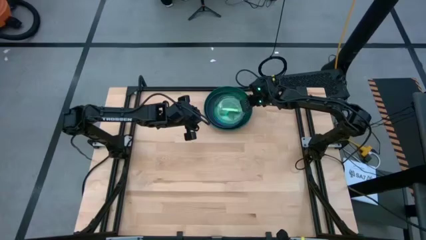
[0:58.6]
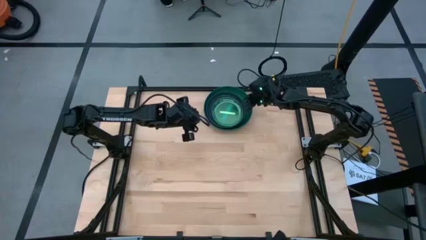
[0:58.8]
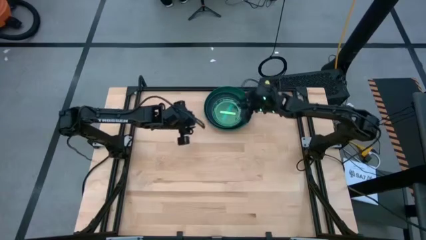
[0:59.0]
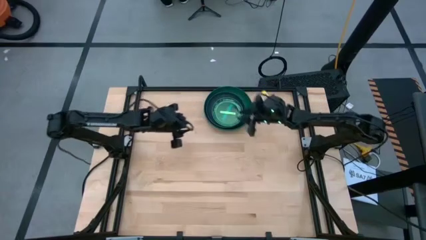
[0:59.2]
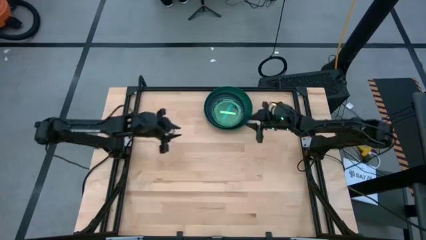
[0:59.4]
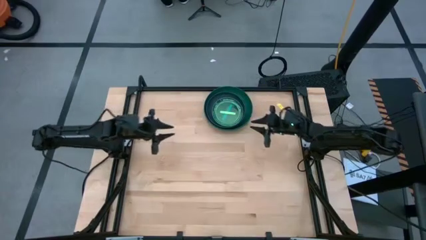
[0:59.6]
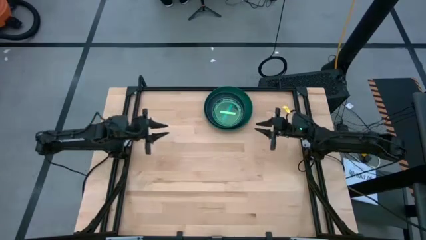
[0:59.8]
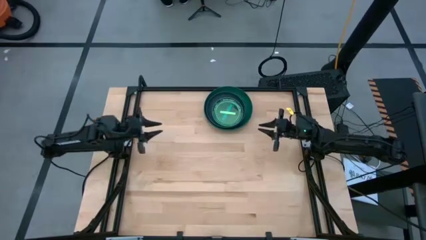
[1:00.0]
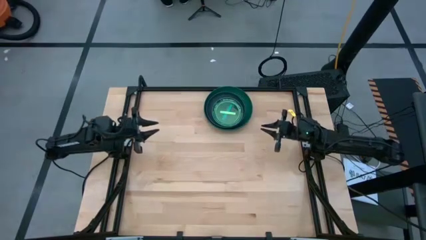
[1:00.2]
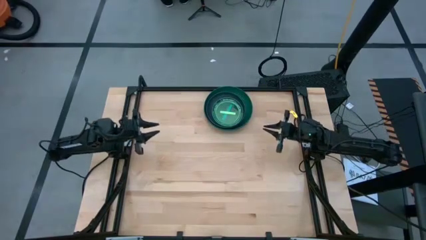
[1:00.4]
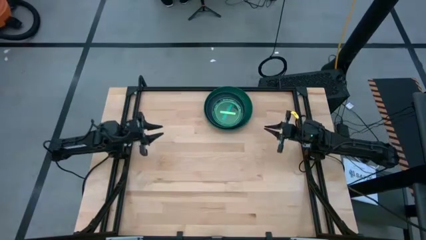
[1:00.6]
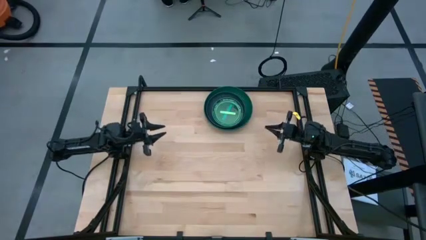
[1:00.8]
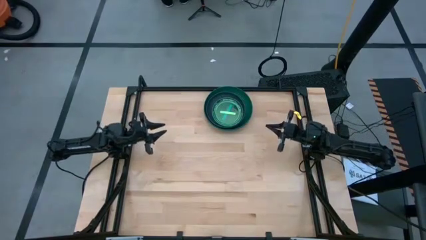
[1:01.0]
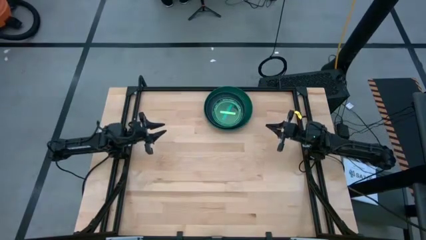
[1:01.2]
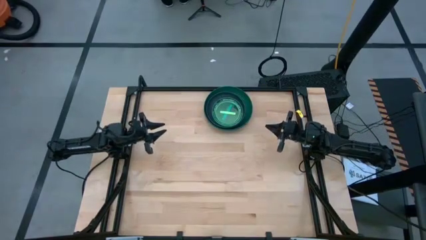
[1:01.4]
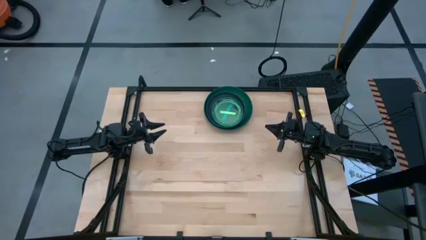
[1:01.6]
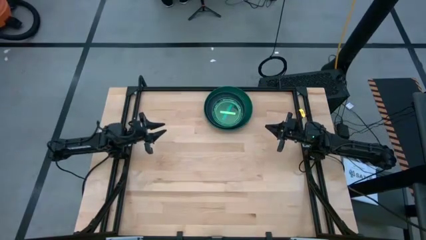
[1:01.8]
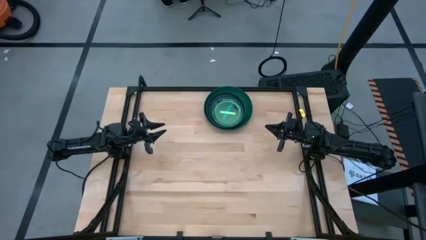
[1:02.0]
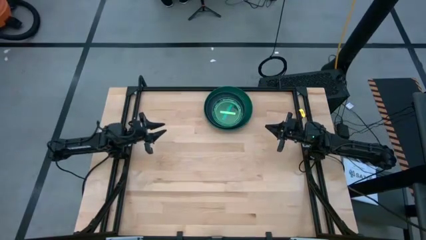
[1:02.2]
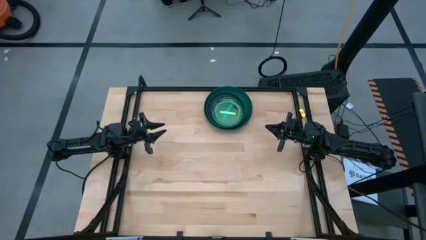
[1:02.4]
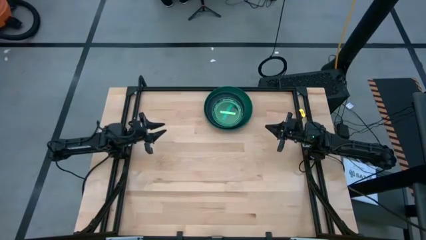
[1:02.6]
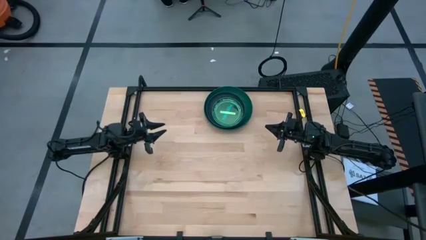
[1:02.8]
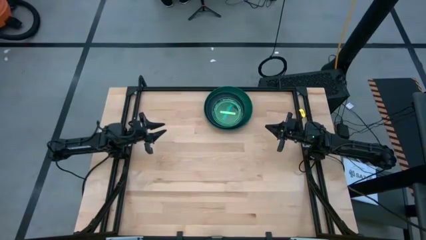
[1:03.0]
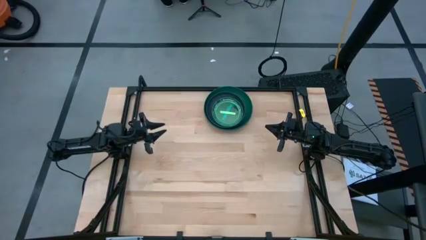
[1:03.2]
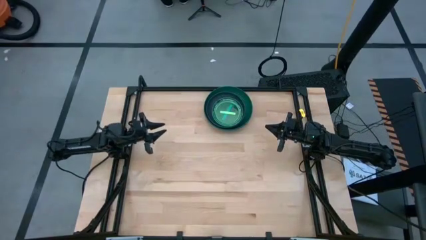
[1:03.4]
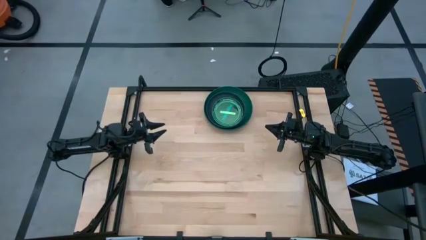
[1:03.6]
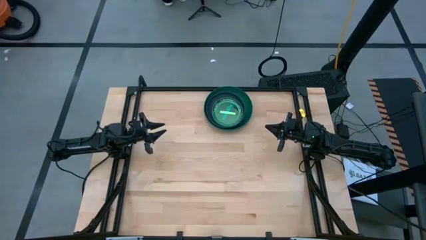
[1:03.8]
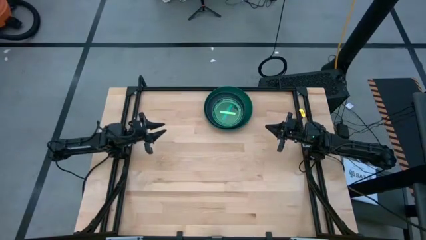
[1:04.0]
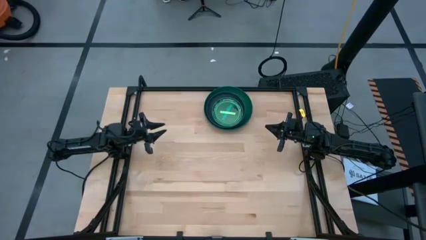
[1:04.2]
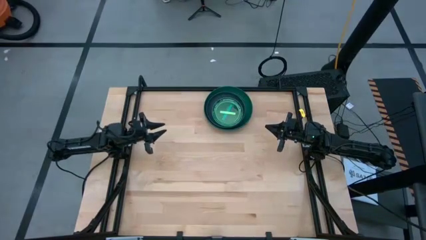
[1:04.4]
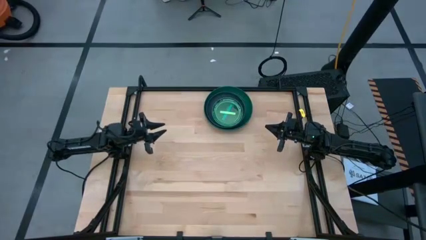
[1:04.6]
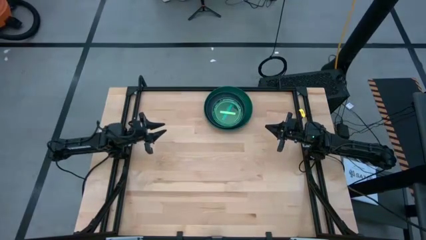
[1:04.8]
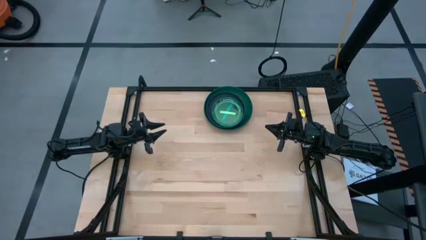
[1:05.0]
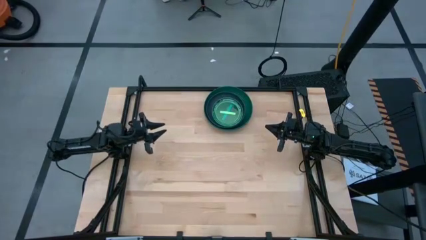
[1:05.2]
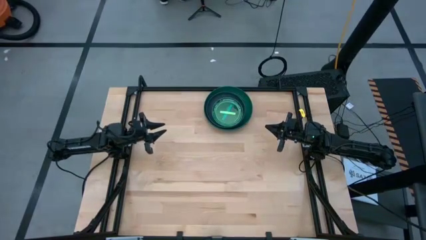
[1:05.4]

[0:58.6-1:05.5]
Task: Stack plastic plates
Return to Home Position

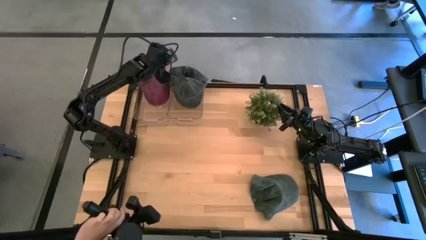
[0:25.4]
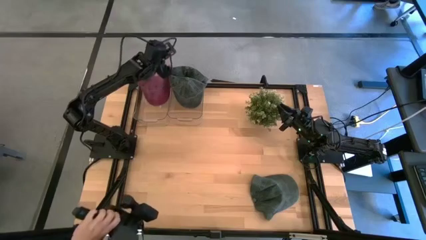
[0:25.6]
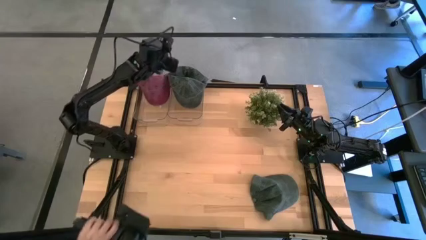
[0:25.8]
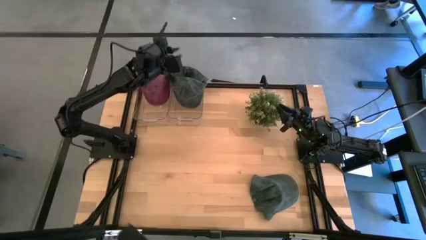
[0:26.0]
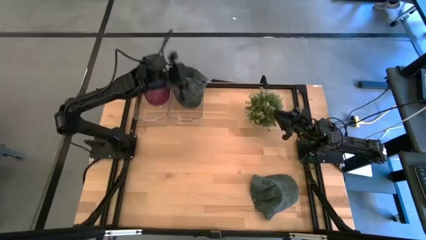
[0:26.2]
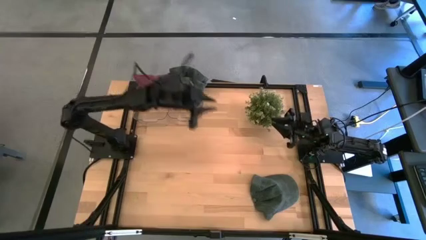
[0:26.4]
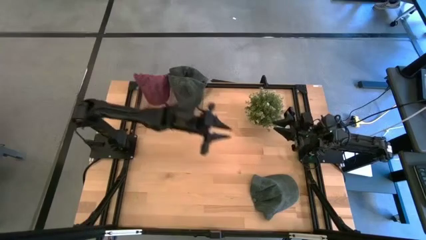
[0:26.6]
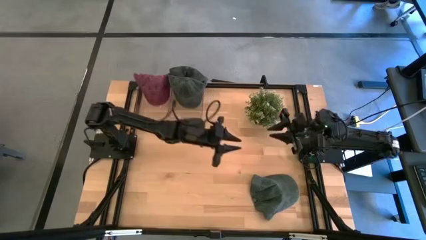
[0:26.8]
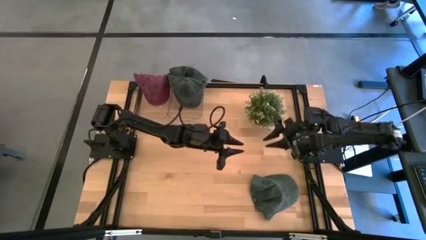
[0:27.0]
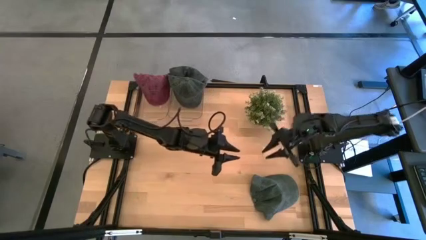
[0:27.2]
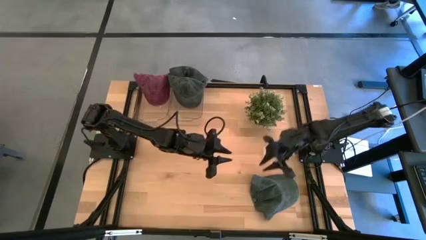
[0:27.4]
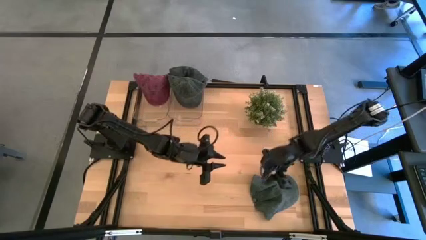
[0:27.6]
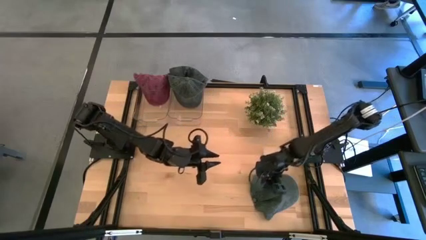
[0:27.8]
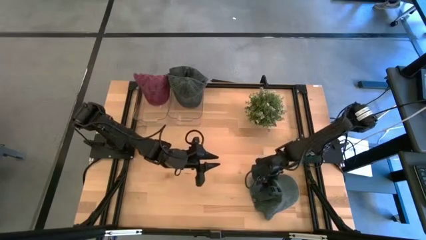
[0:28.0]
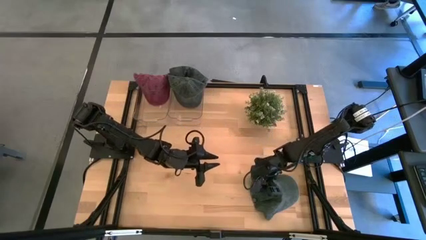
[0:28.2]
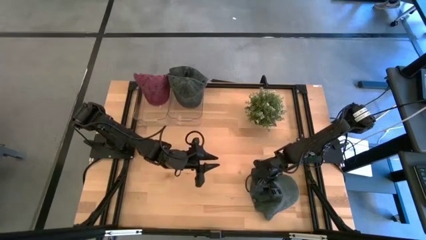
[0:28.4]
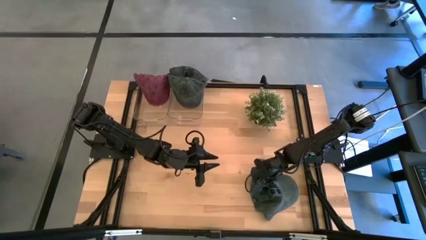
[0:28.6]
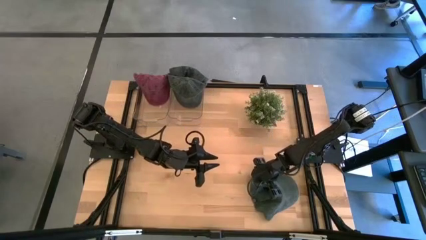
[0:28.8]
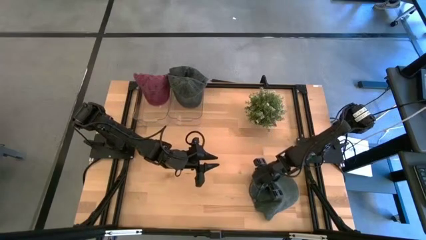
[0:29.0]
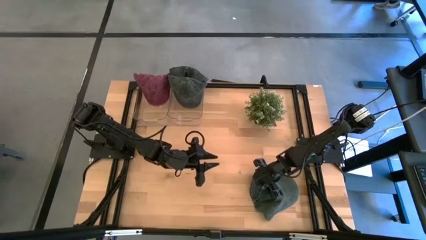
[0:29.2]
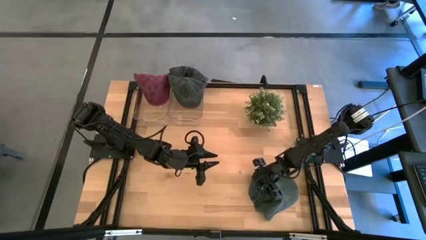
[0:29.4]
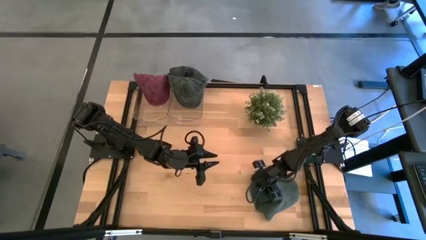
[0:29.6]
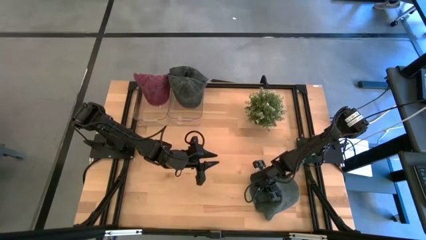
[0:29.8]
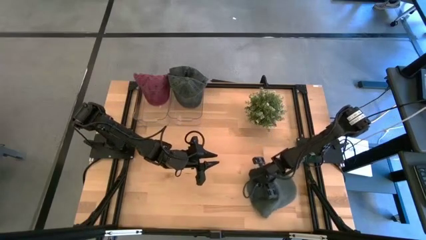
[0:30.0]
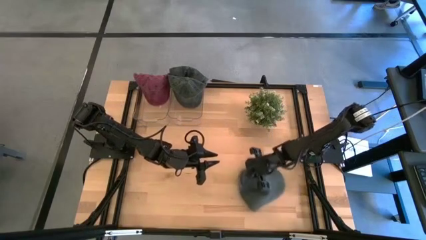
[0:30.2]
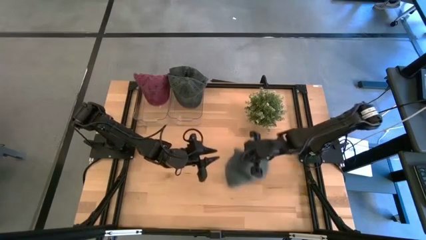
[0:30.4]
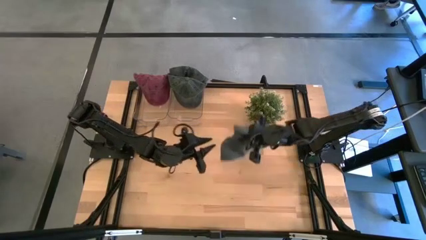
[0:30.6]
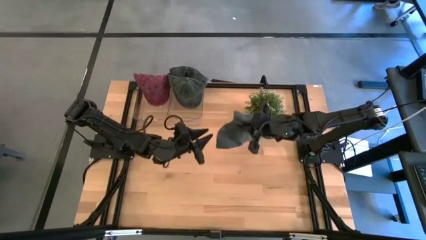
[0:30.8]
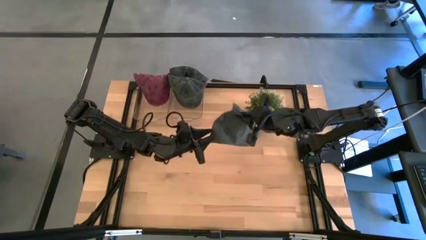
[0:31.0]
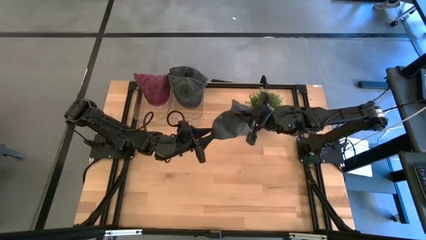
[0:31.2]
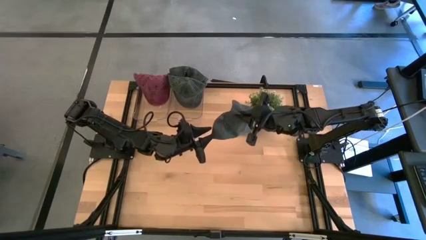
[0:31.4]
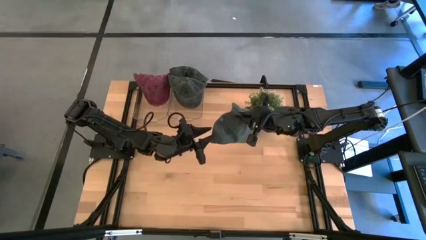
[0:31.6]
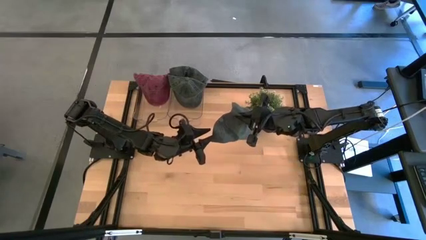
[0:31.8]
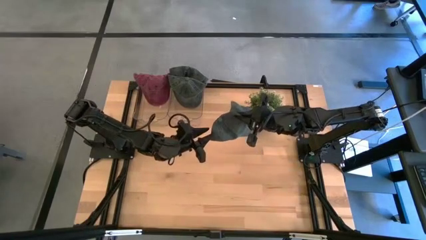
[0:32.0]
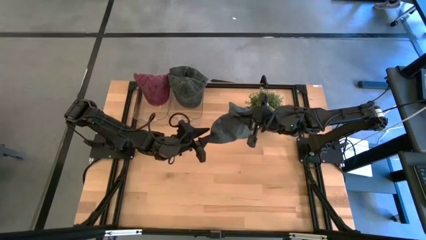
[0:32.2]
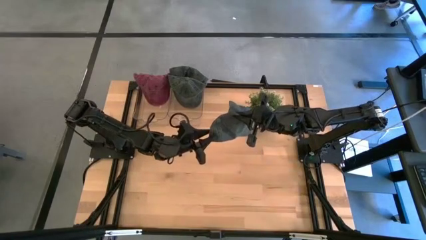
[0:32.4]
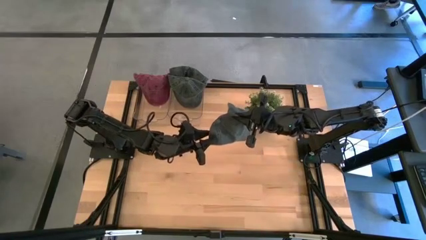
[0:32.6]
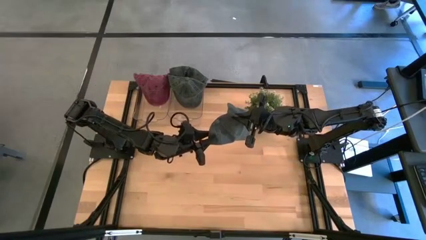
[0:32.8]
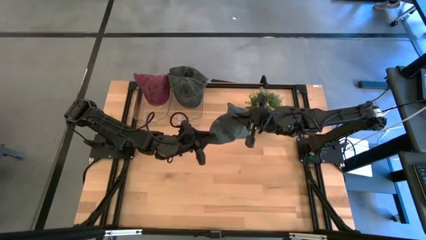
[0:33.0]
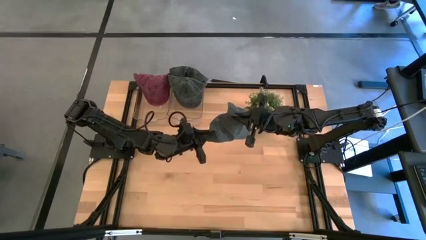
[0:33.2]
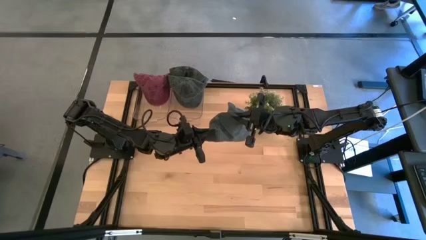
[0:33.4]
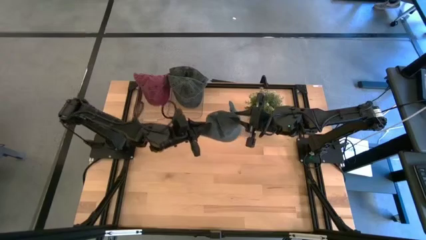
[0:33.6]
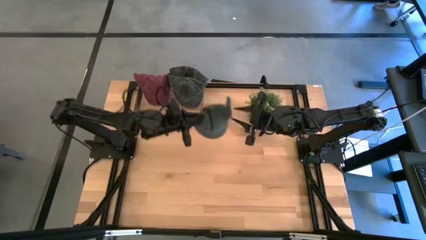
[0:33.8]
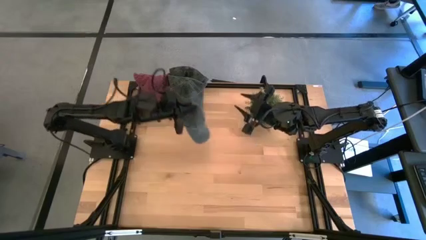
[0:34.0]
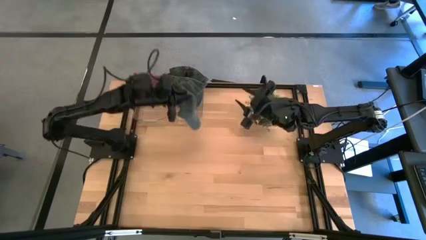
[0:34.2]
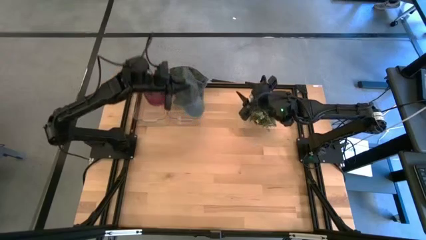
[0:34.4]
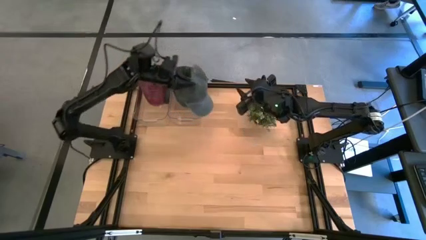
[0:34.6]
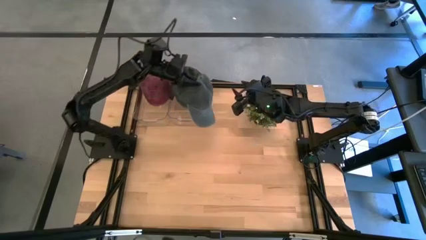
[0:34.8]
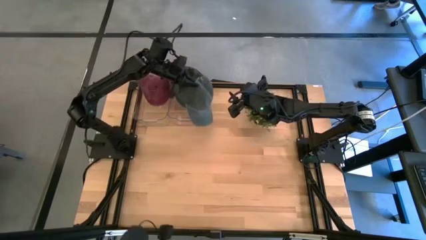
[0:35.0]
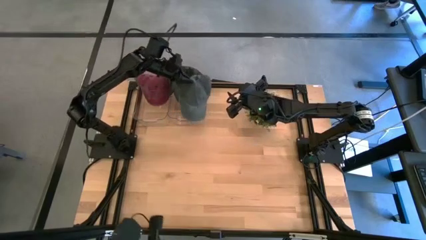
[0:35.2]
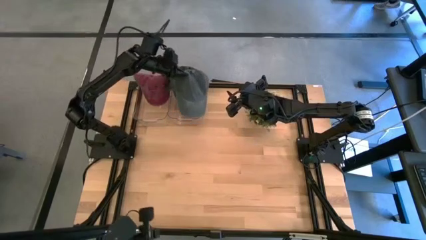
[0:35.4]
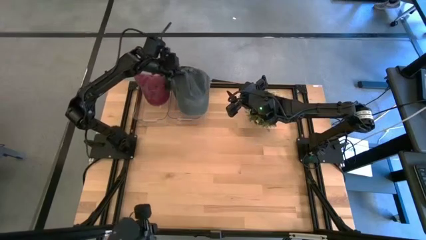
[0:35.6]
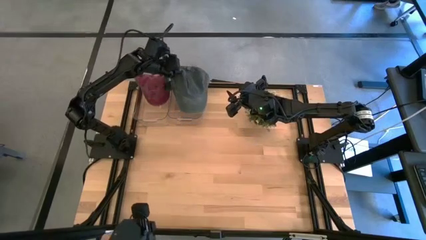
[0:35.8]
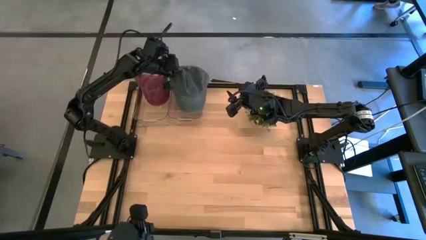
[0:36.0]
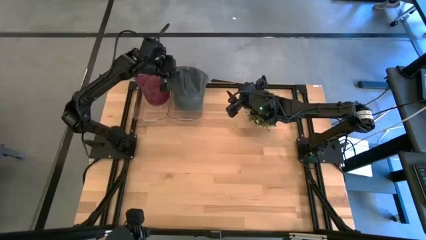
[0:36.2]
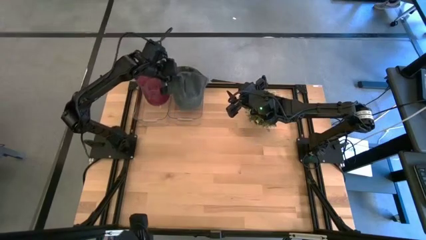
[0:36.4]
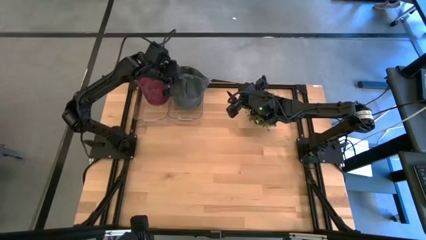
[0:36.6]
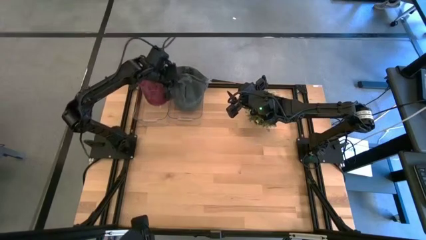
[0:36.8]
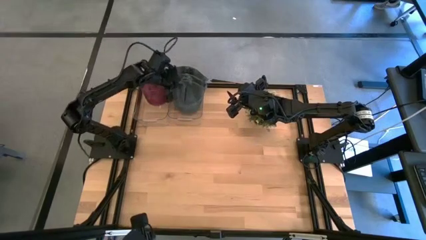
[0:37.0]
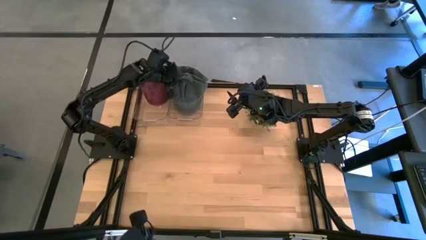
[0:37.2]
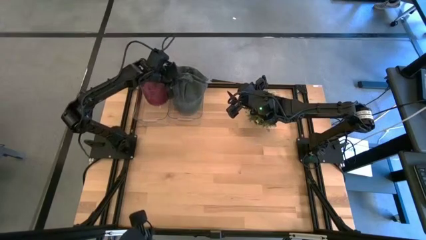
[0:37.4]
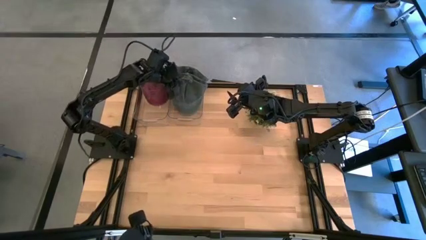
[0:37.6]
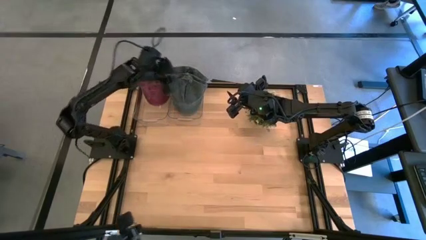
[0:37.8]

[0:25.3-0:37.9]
Task: Pick & Place hat
Put the black cap into the right transparent bin
